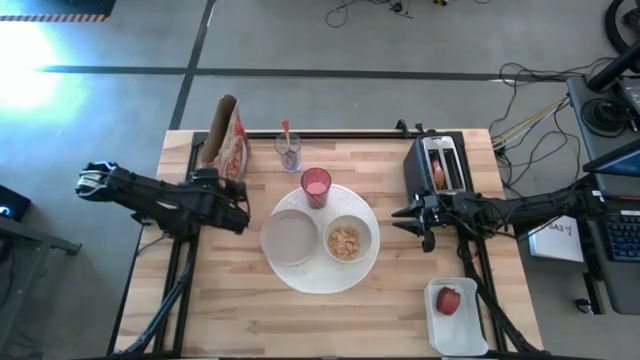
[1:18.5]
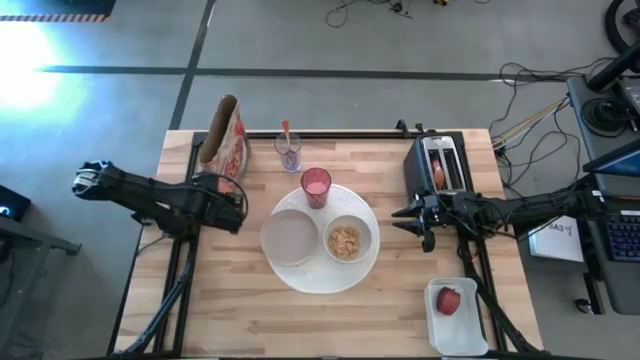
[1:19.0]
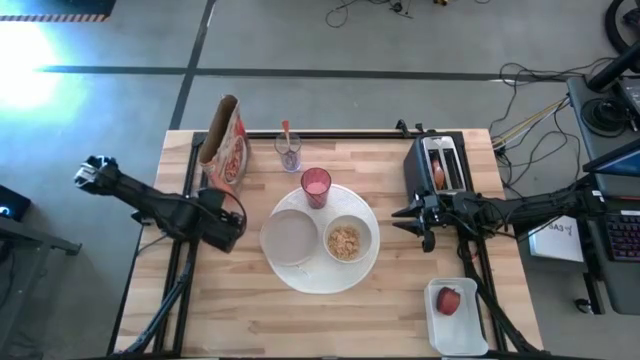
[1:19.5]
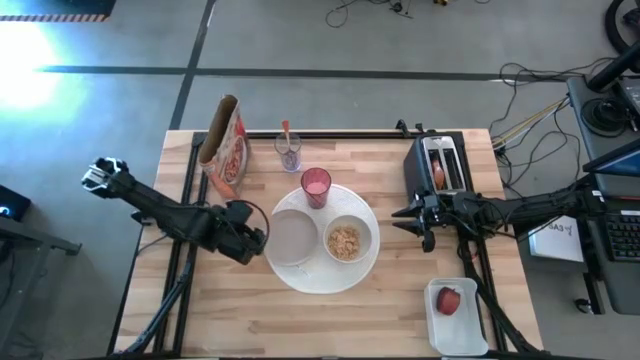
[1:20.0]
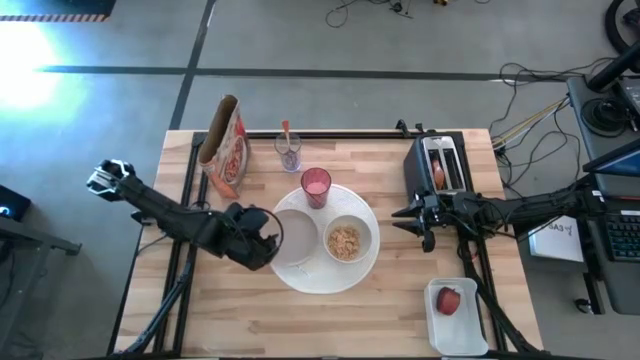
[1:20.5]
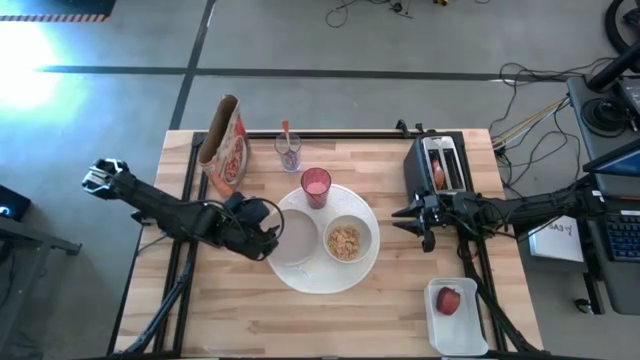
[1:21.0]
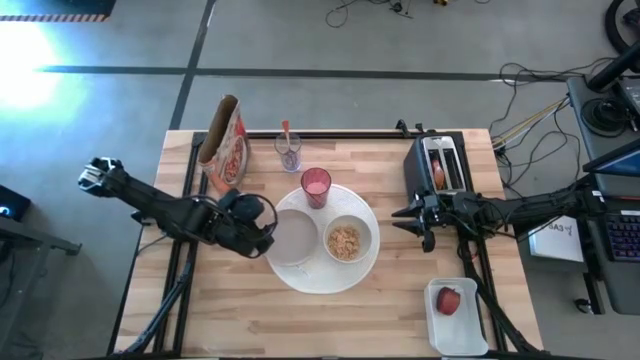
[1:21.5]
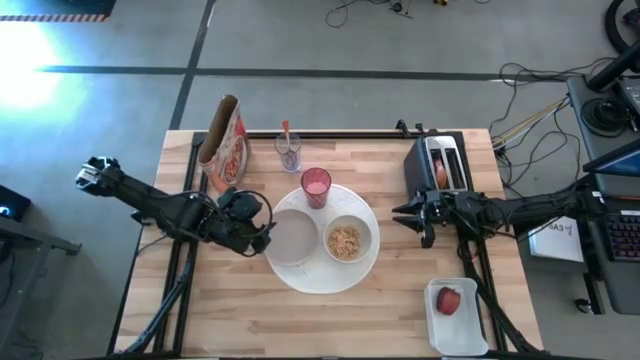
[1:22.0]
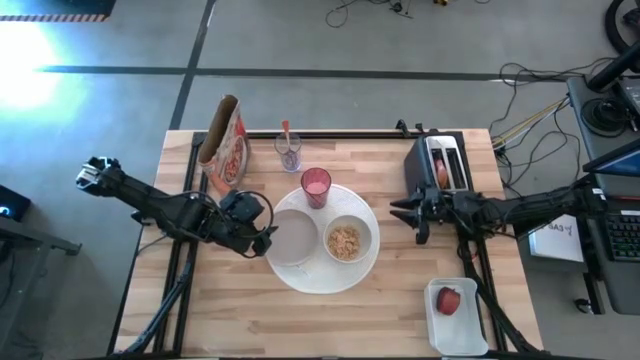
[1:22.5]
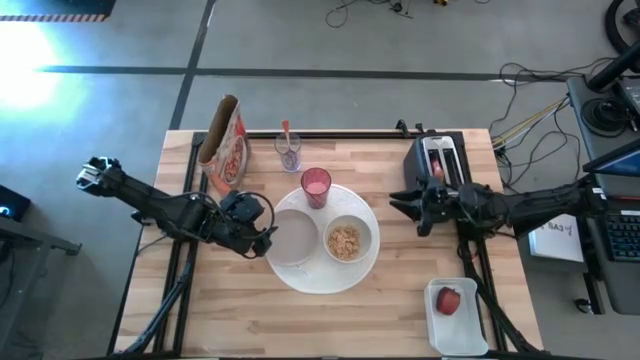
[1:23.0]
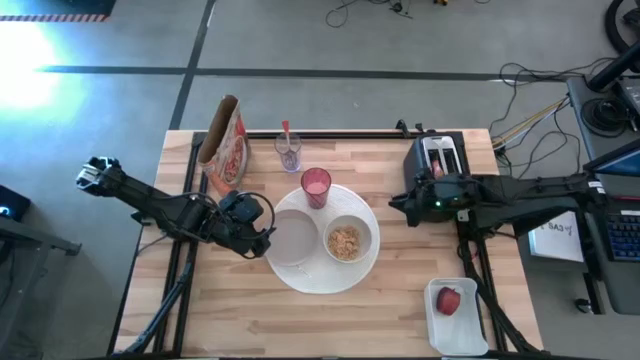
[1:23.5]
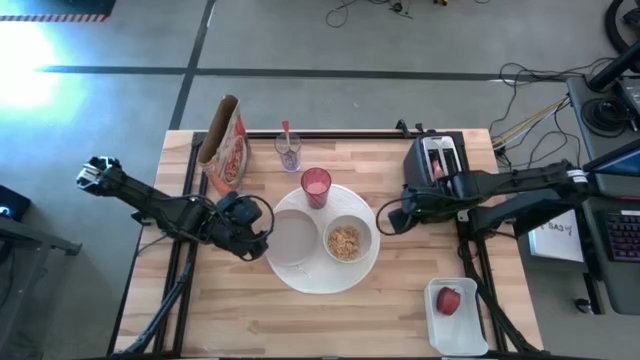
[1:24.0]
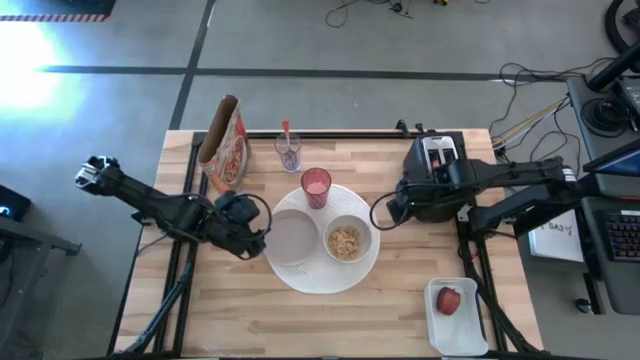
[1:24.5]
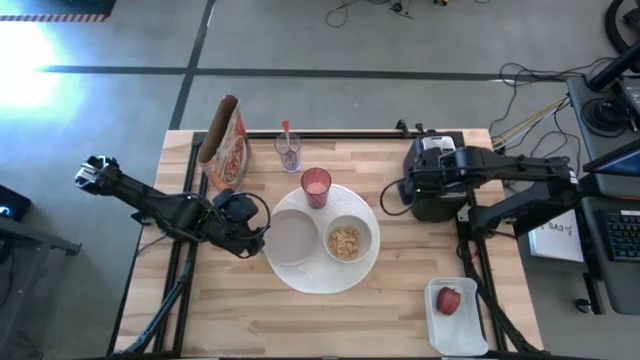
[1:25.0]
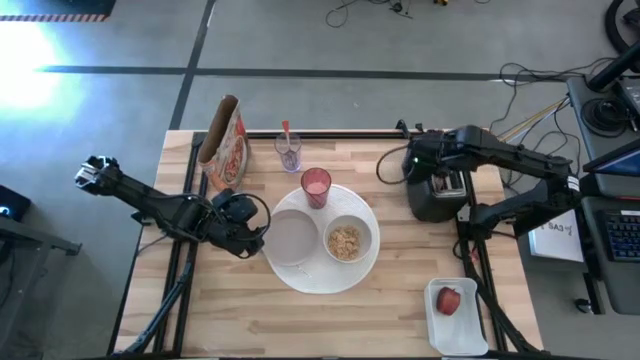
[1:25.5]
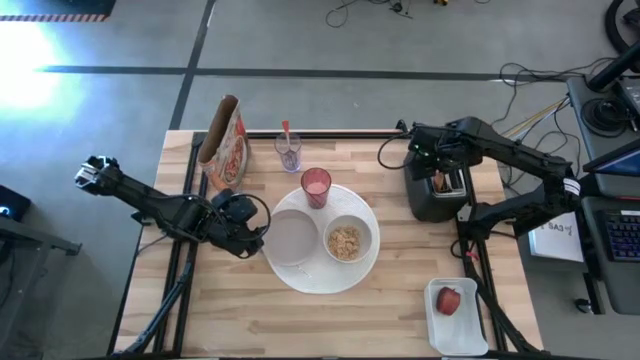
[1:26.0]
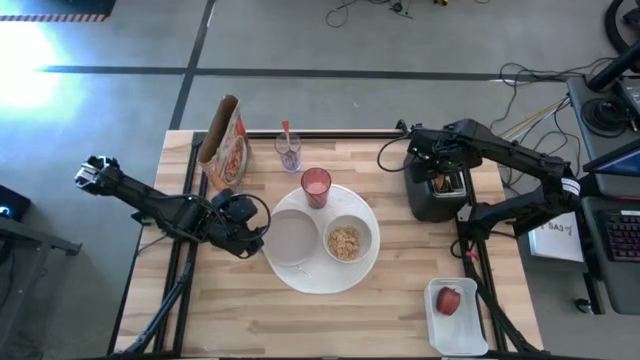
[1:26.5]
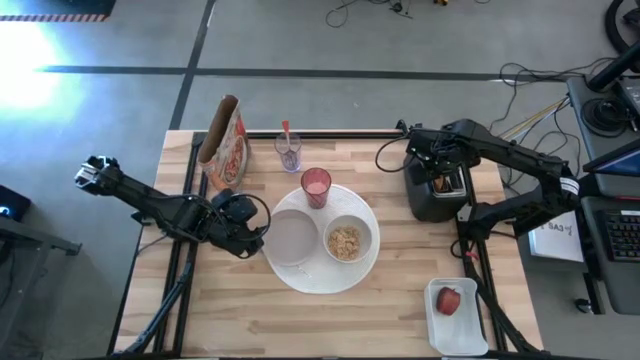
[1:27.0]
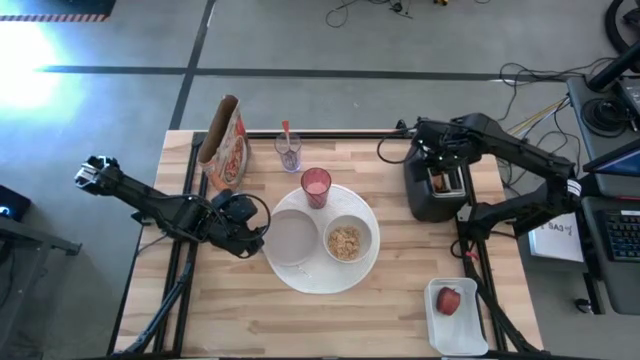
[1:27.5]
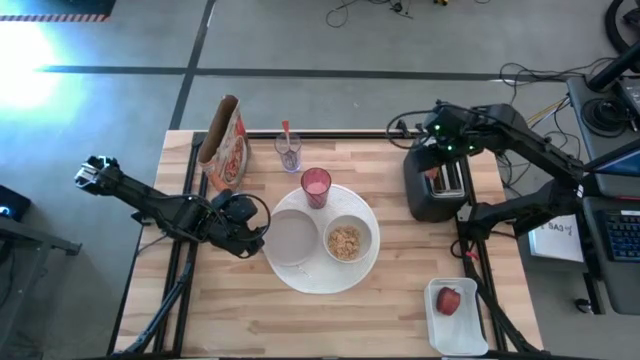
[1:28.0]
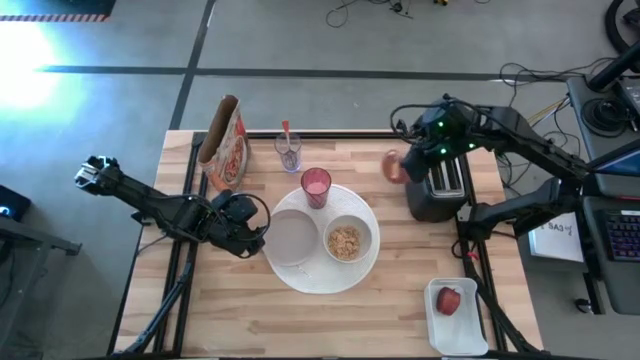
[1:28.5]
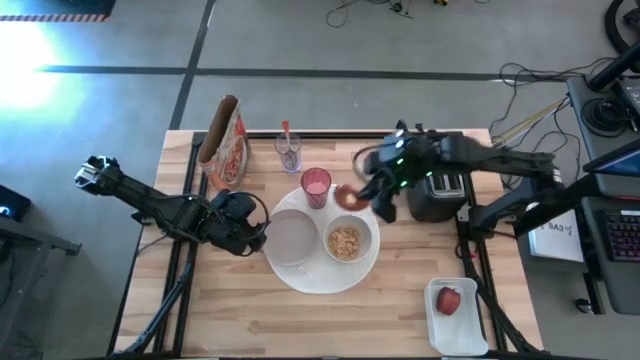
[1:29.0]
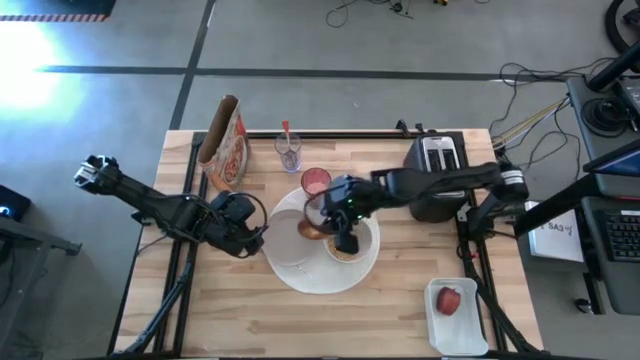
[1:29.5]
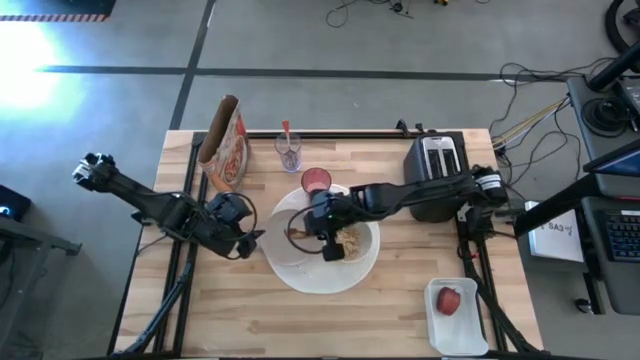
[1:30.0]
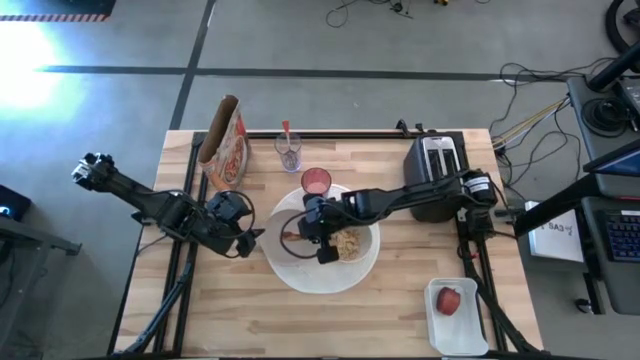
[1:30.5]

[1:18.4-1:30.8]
Task: Arrange a breakfast setting
Put the toasted bagel on the gray plate

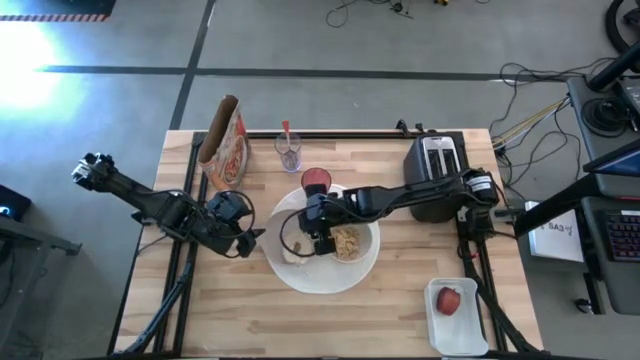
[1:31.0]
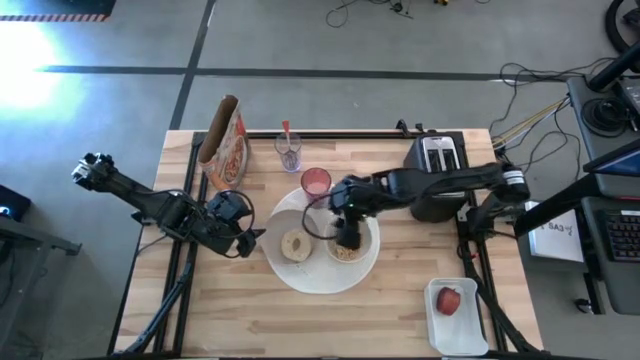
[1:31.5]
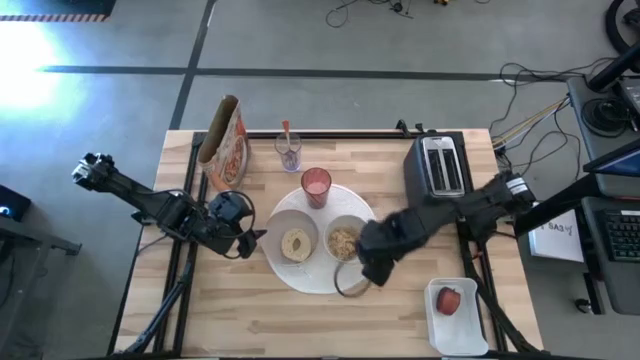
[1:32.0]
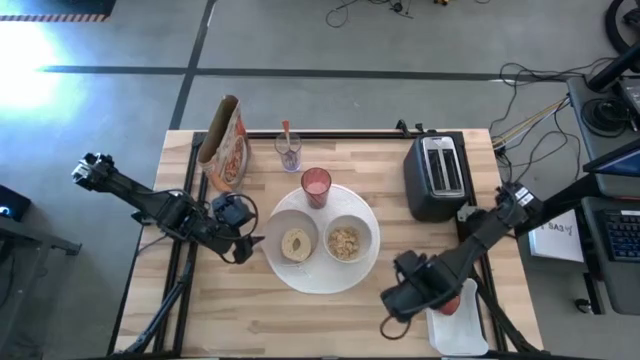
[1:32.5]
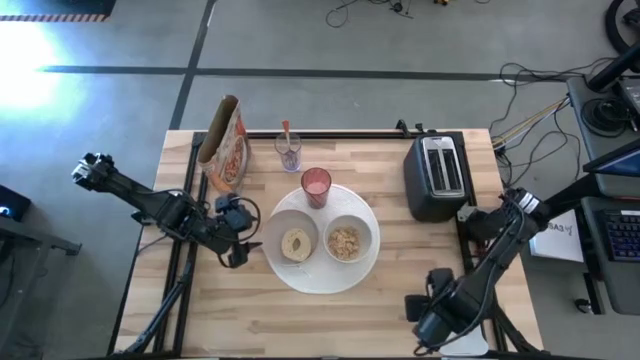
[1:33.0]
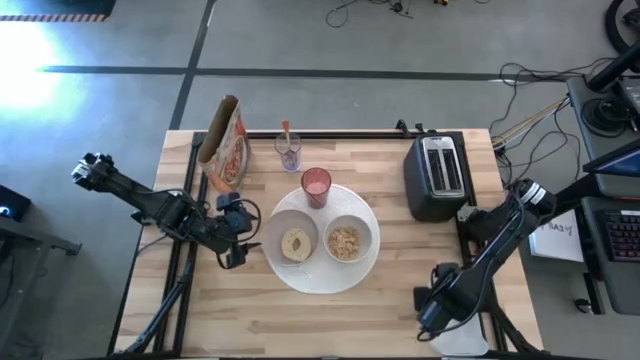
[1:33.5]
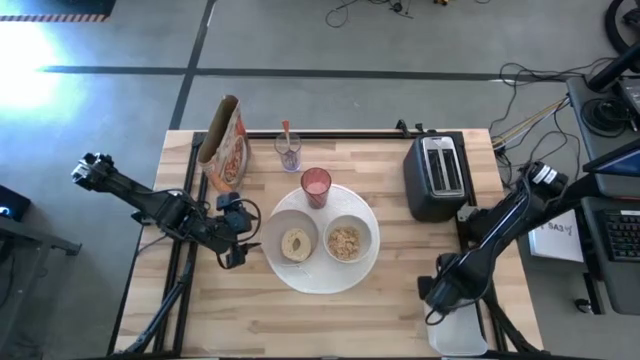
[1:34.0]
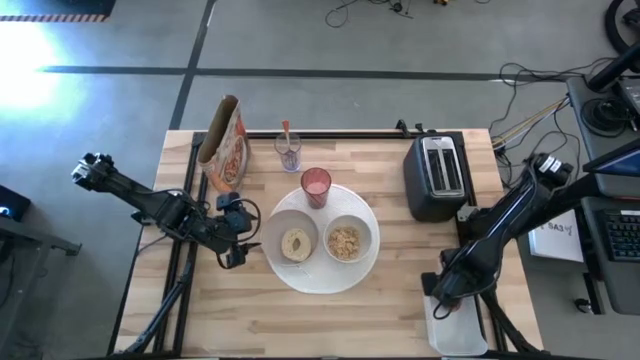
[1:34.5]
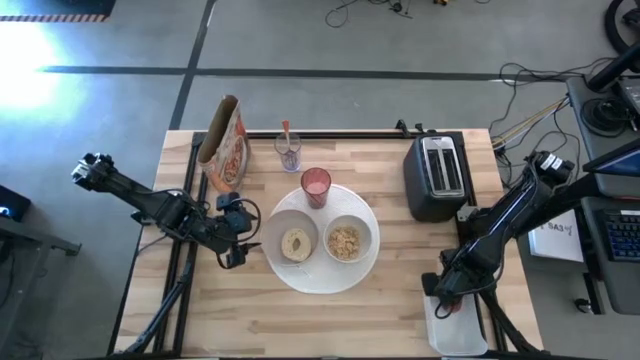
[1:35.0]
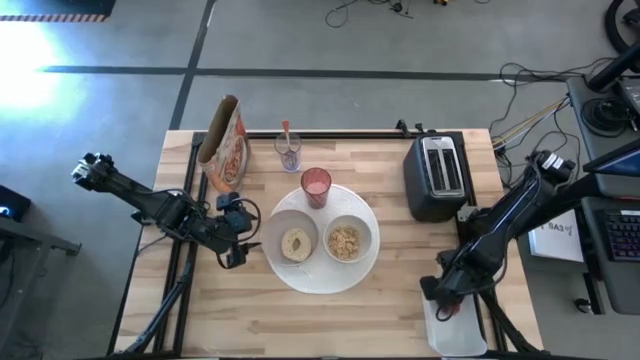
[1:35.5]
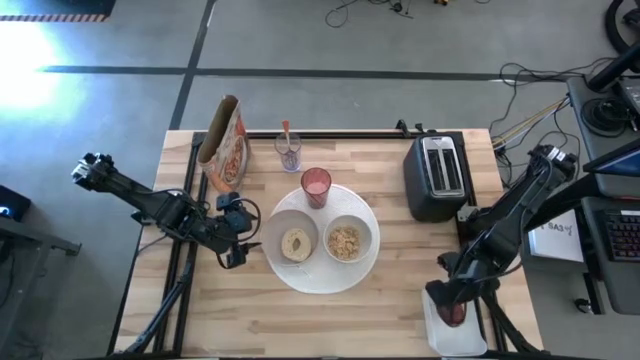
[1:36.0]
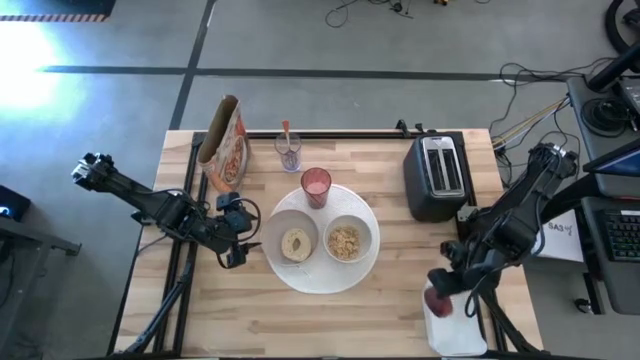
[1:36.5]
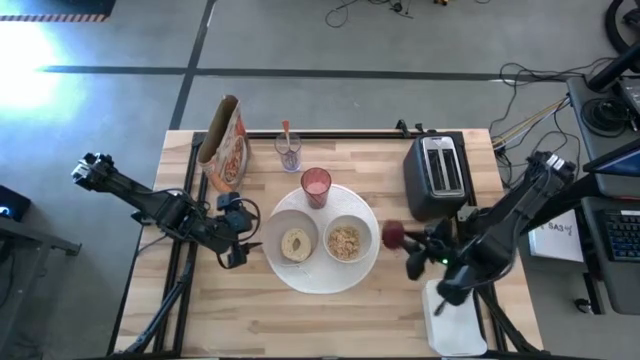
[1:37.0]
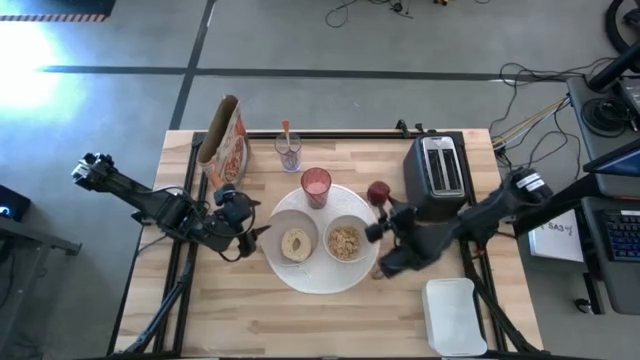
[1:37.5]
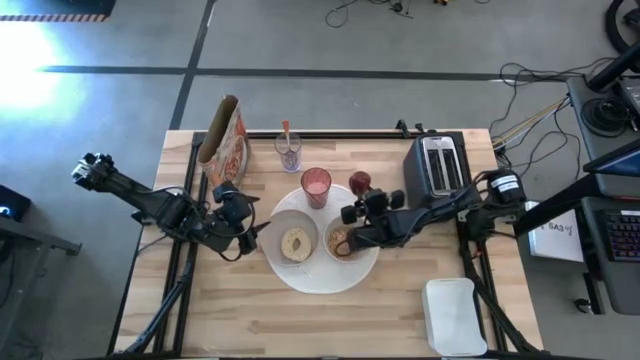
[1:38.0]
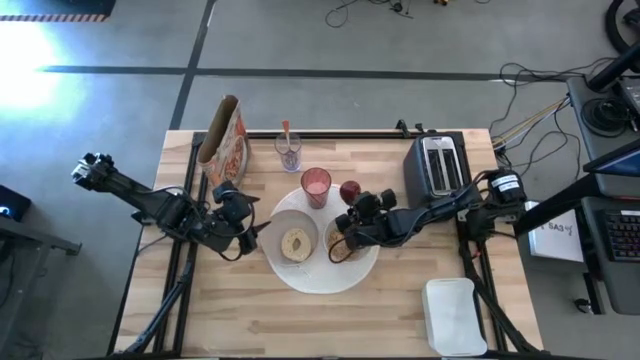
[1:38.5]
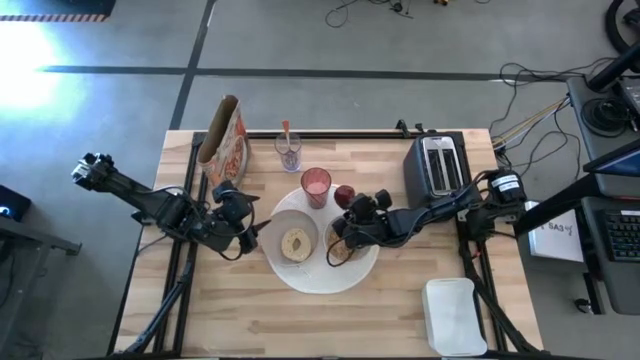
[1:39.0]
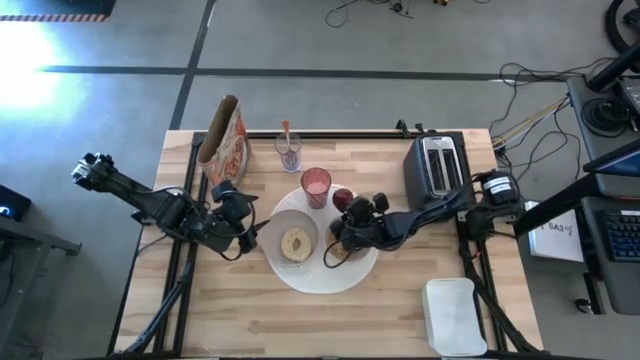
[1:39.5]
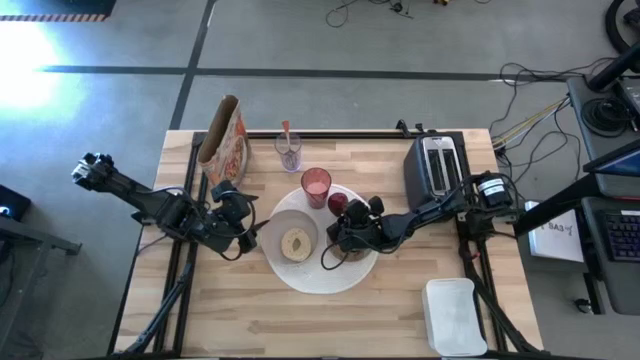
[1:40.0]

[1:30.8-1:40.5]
Put the red apple on the white table mat
